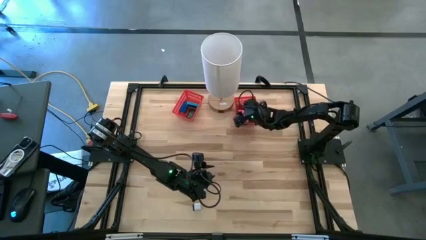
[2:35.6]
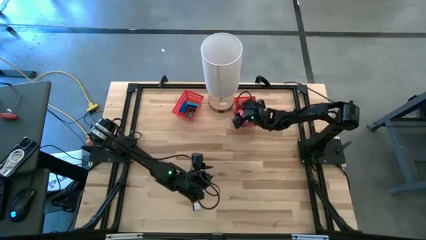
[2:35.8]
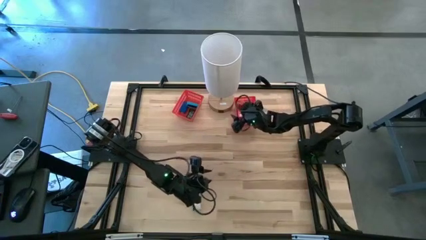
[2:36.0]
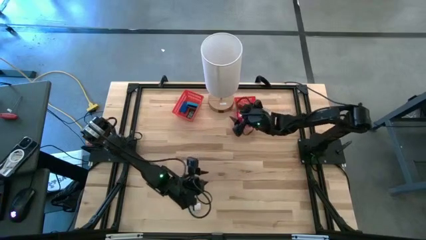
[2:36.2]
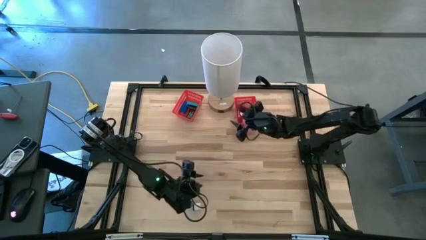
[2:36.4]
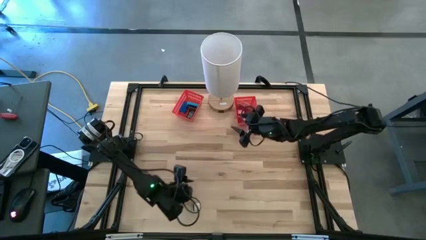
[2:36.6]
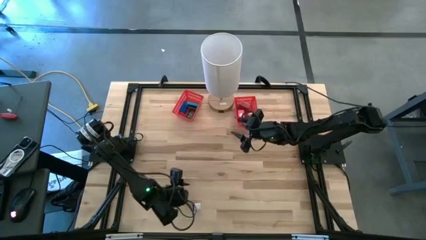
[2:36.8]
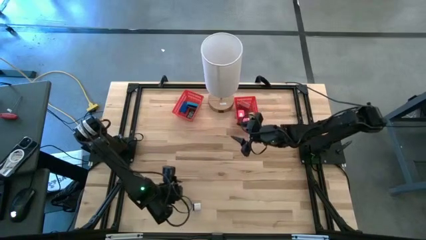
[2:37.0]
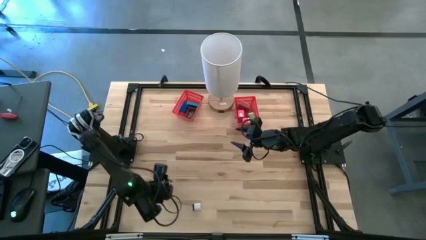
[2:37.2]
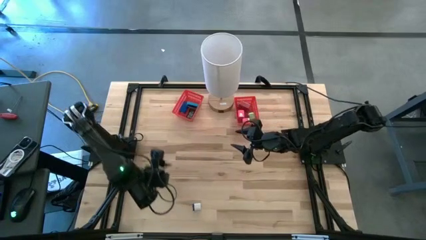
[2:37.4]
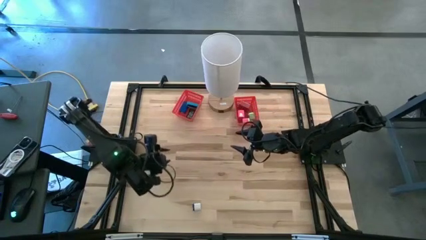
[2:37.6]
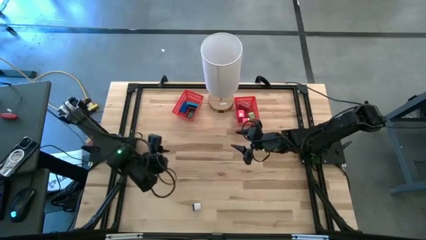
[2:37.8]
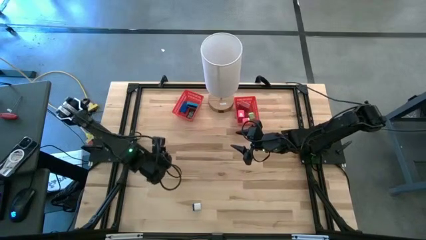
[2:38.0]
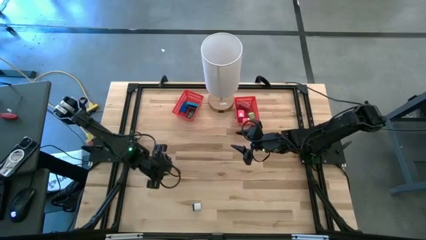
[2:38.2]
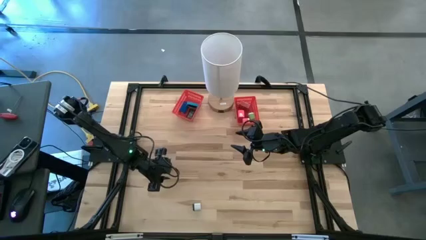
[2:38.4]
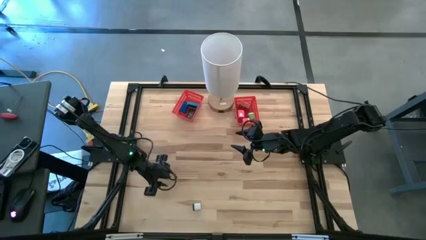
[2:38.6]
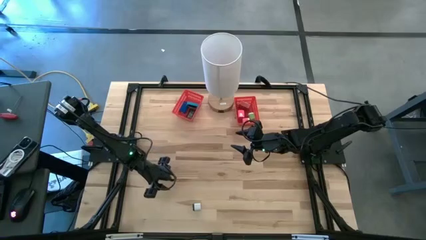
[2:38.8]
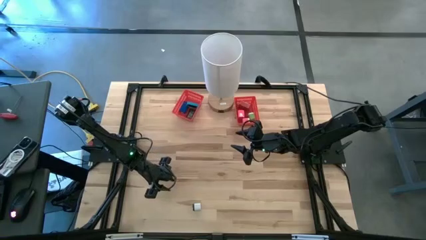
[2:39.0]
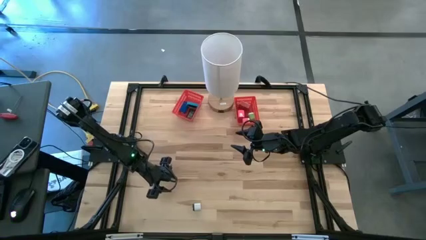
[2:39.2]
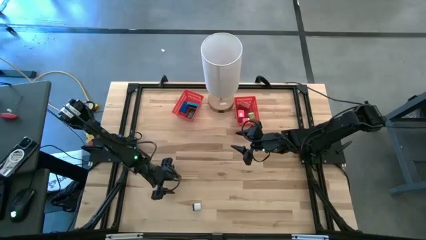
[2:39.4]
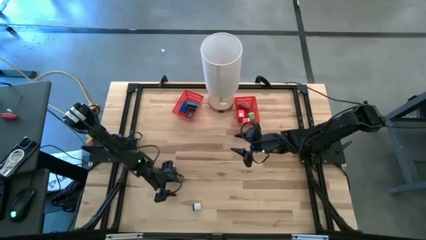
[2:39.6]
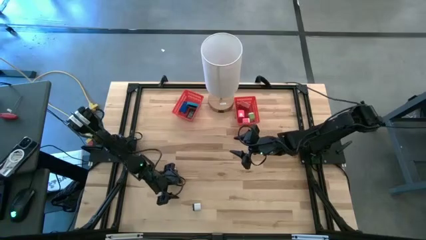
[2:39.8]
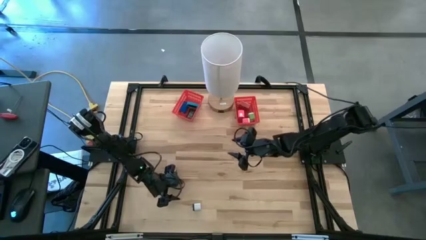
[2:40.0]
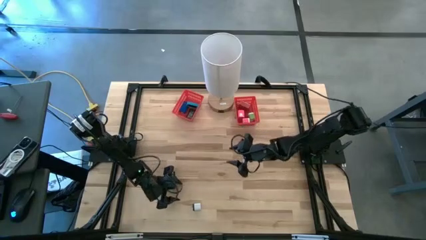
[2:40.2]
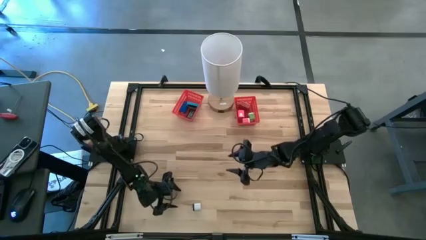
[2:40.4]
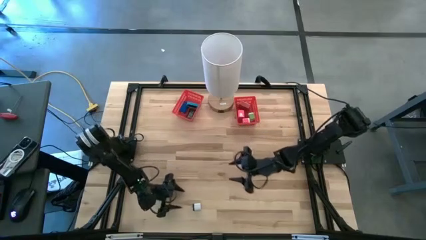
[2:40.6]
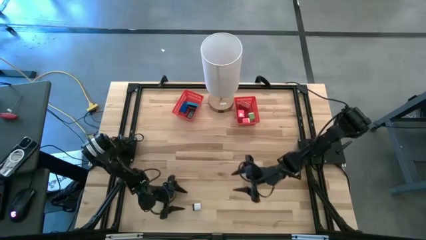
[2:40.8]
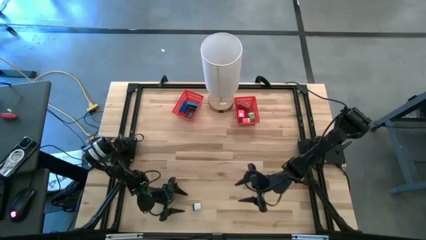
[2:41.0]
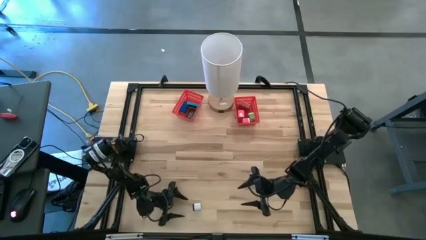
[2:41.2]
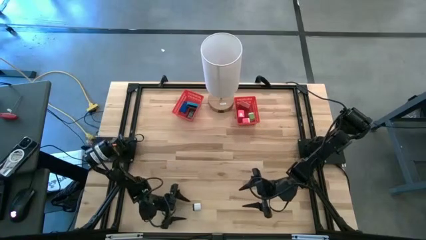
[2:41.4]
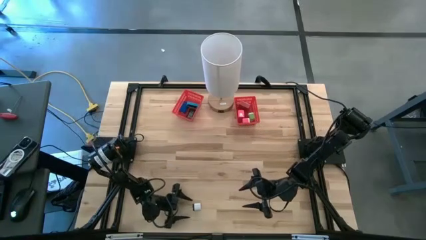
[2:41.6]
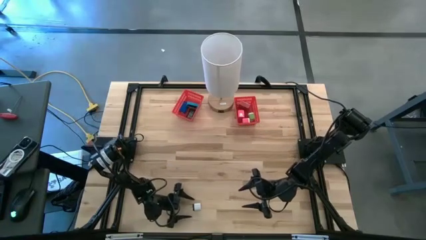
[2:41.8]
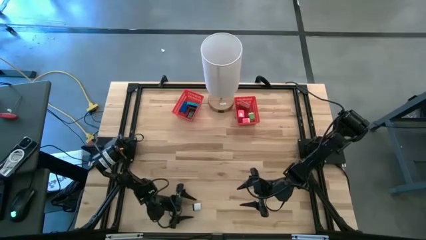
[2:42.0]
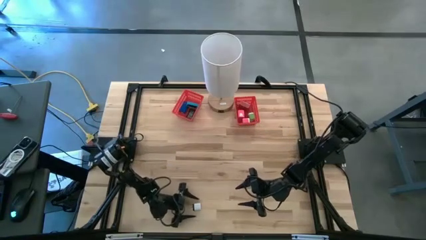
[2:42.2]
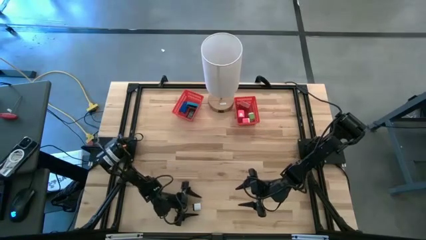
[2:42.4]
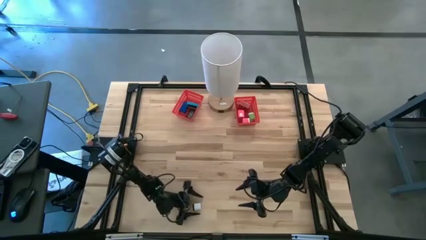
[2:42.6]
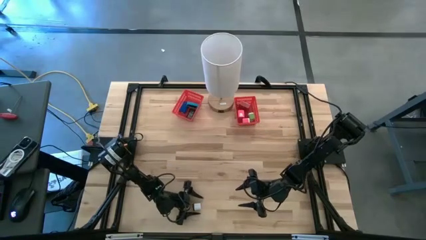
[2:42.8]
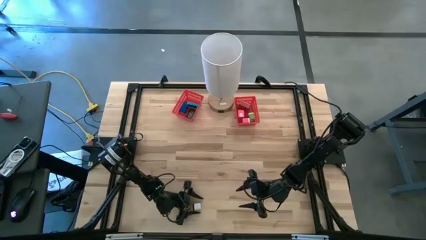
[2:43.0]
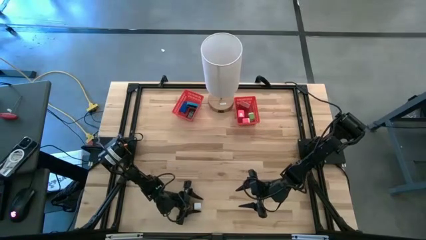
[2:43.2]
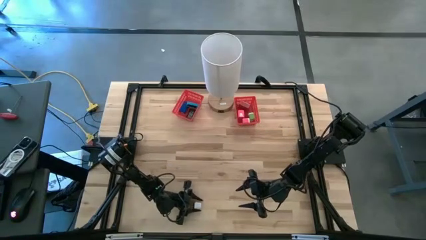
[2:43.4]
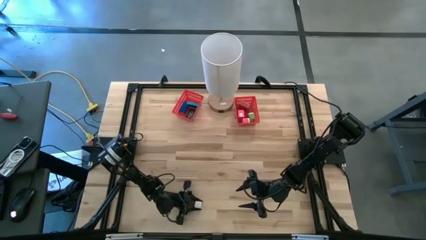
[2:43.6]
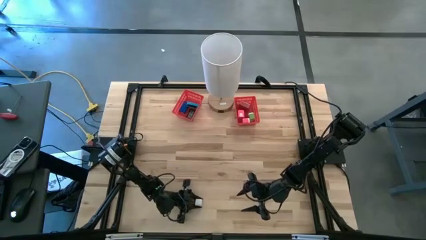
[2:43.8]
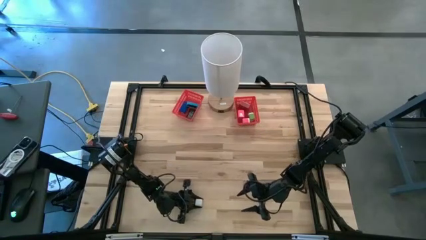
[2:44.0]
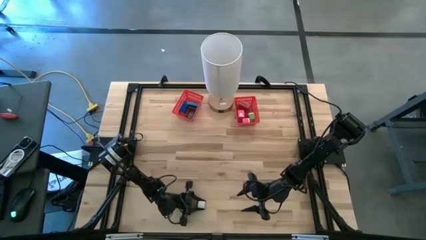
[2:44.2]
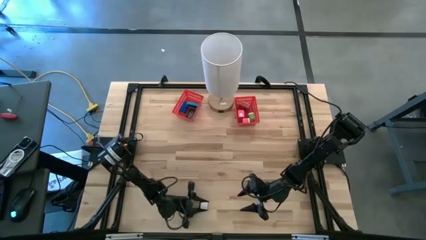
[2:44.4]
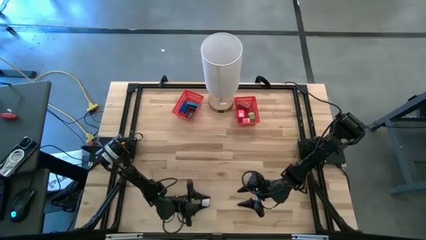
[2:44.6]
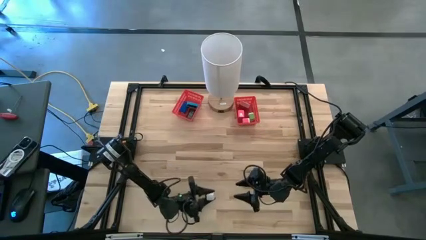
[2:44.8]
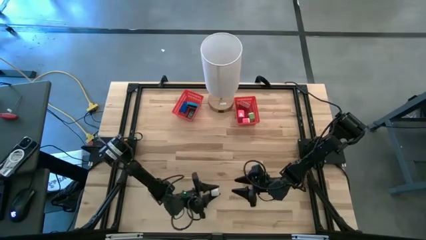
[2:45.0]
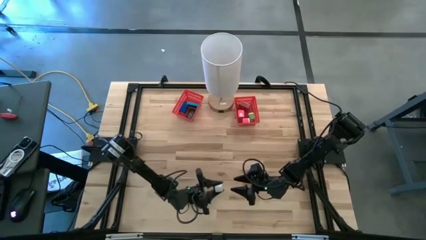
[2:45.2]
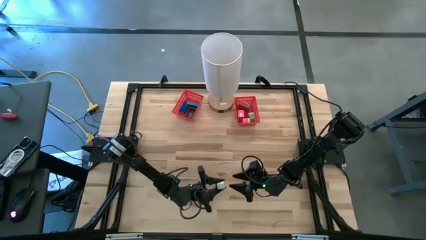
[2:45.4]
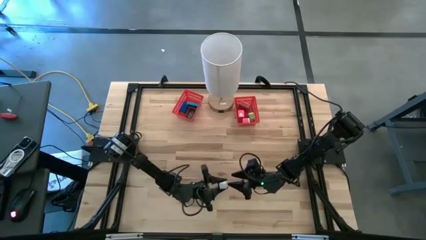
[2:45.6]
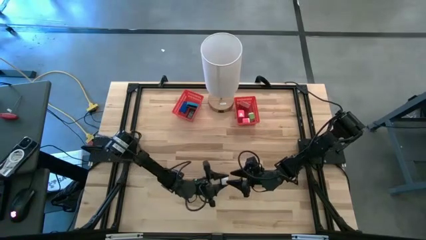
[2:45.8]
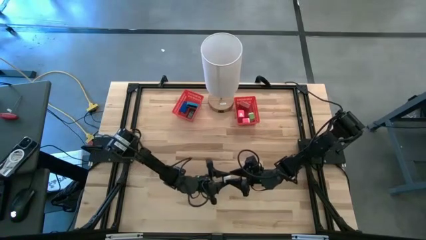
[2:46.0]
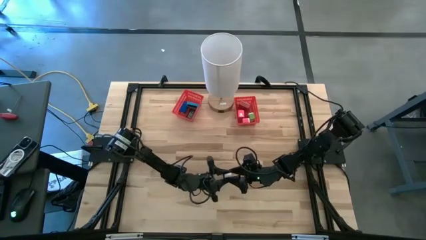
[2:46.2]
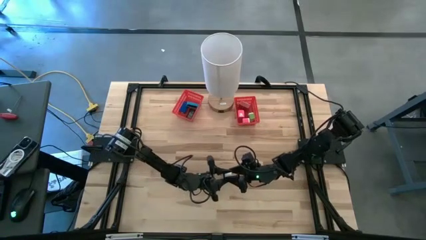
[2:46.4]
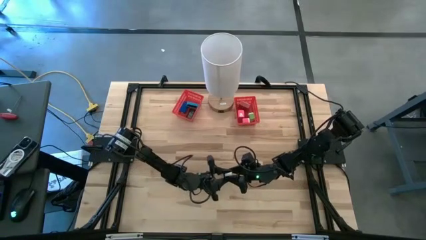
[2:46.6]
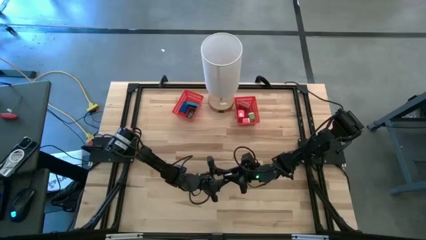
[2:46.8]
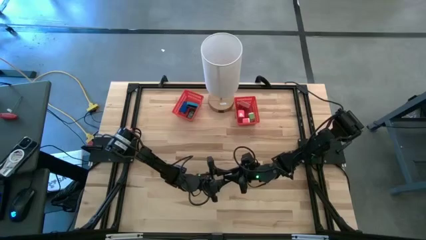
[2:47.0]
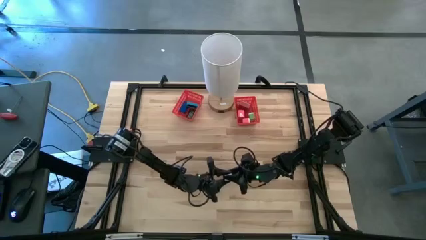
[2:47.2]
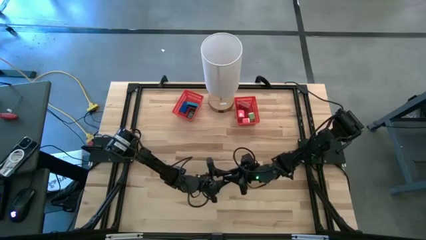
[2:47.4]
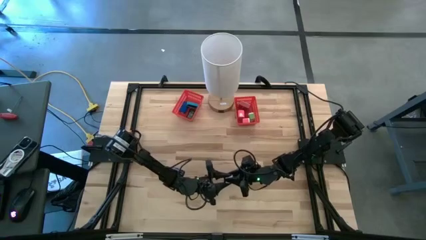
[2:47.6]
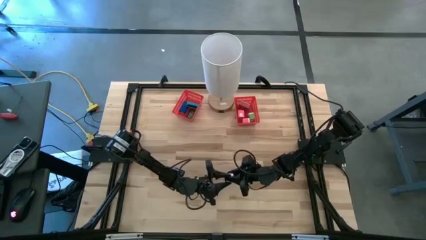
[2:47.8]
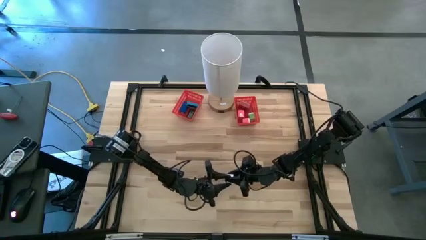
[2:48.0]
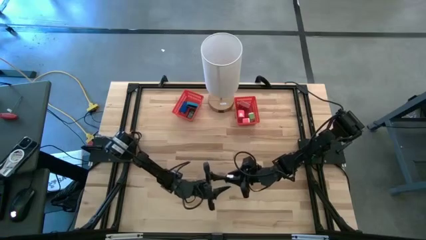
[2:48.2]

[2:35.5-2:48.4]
Task: Sort adapters and digital timers
Put the white charger adapter into the right red bin

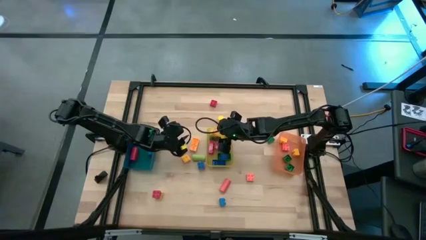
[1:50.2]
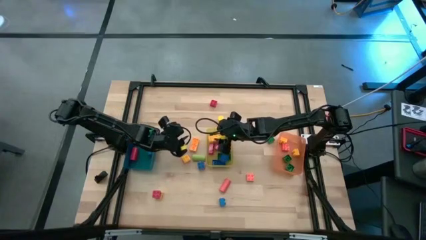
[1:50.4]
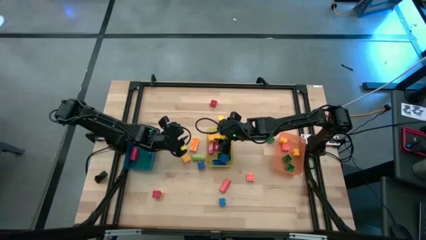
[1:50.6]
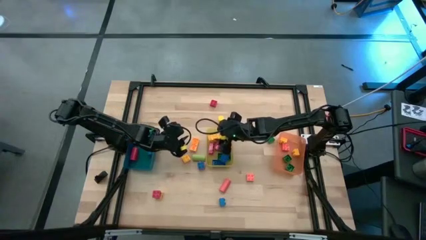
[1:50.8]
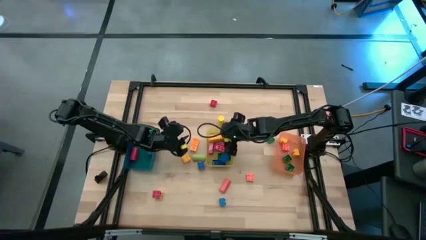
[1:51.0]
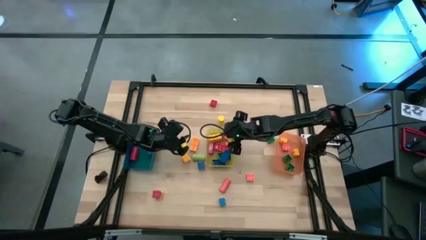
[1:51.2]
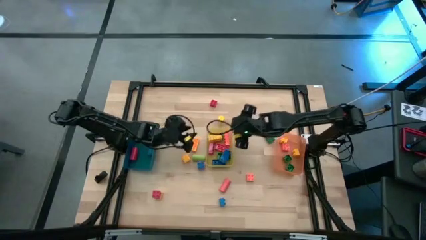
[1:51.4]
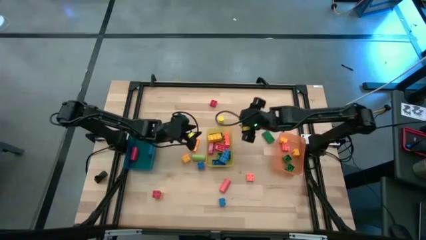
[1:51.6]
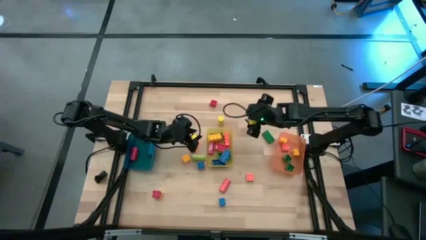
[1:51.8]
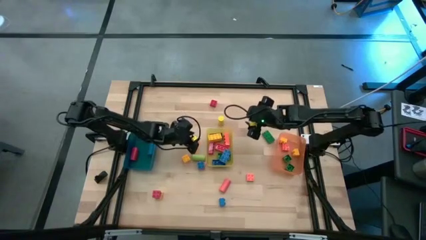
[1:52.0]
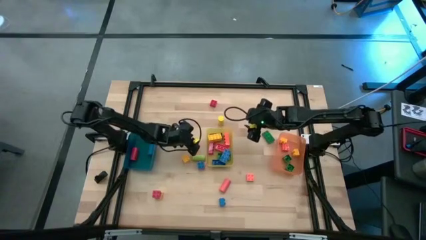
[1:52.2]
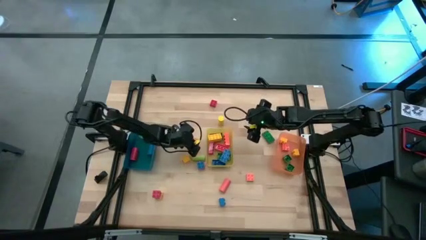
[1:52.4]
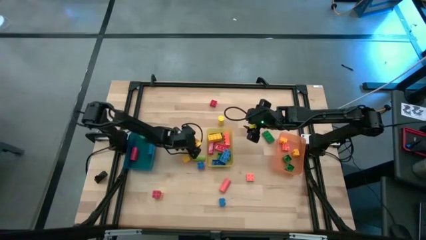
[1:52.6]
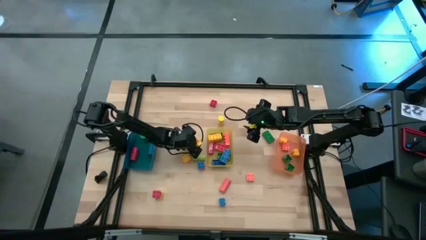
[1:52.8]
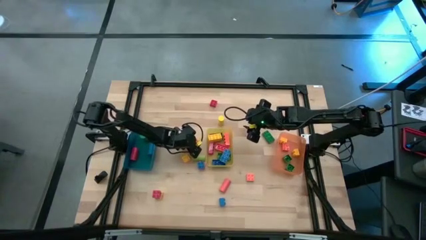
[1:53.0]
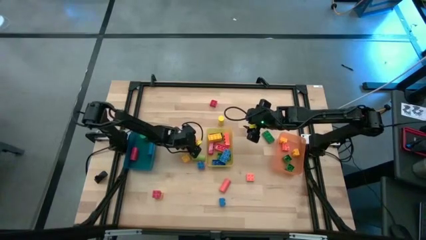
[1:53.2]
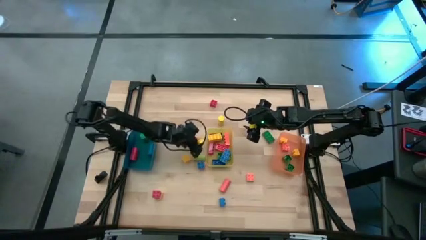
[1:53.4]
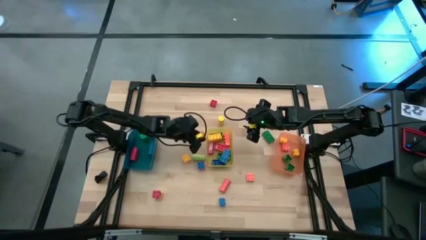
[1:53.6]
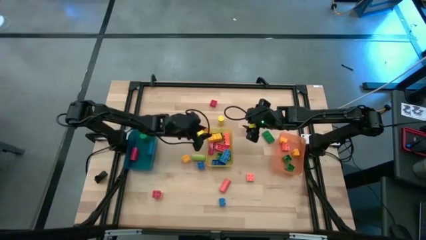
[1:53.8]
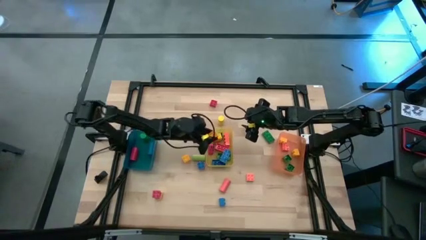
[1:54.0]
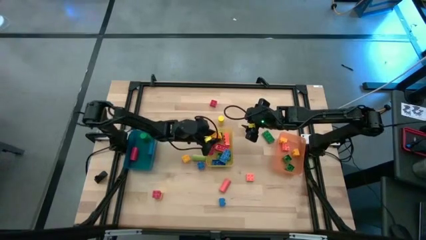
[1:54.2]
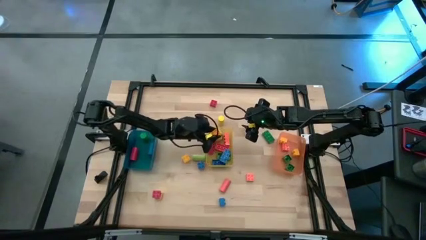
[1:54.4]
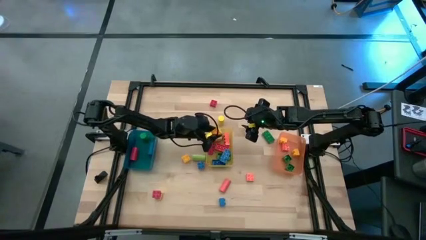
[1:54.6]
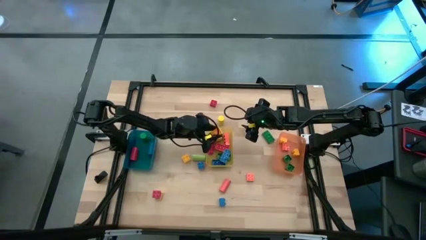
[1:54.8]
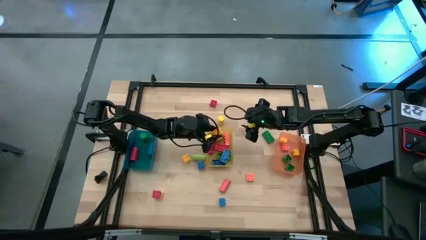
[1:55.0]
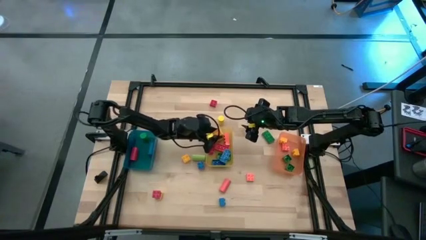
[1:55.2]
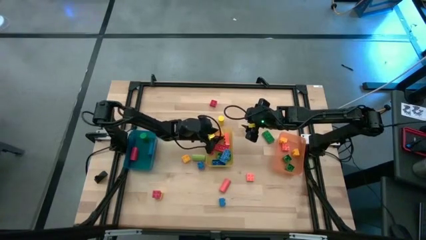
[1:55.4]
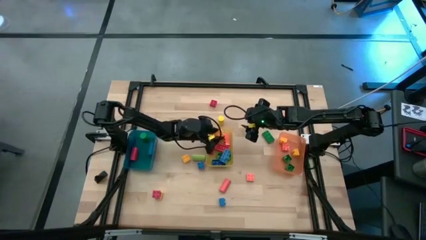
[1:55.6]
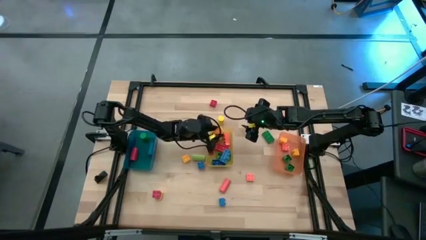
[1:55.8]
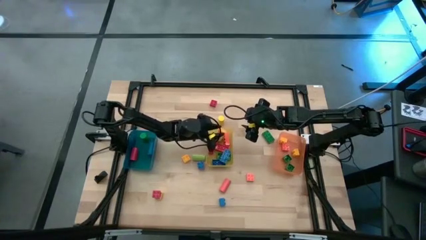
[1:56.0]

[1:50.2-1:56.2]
Task: Sort blocks by size
Put the yellow 8 stud game piece into the yellow bin
